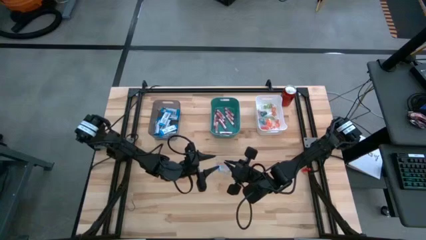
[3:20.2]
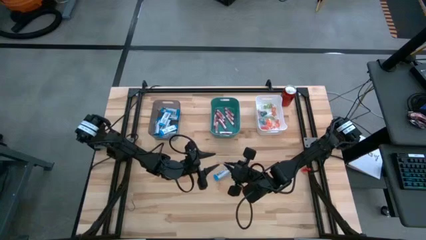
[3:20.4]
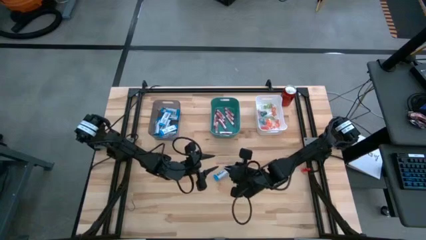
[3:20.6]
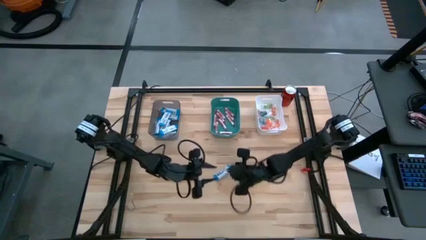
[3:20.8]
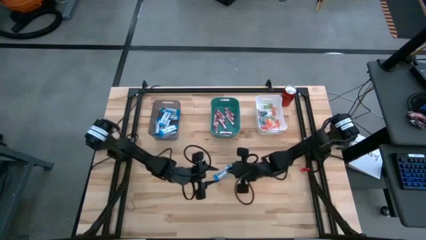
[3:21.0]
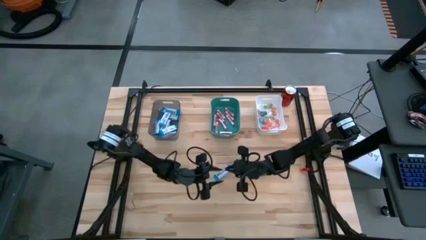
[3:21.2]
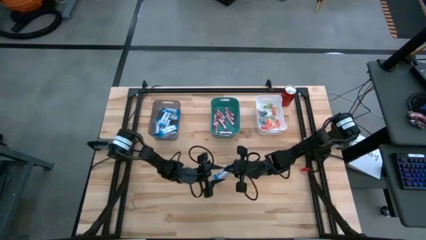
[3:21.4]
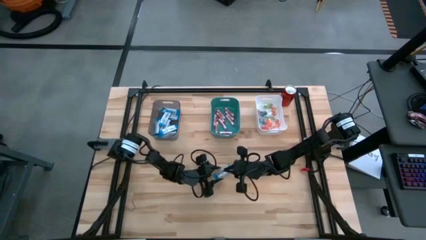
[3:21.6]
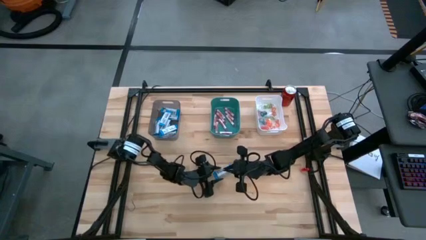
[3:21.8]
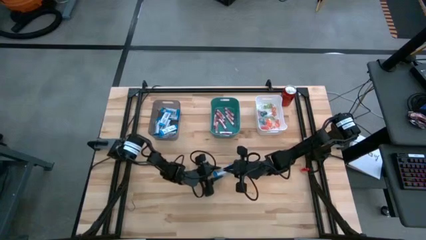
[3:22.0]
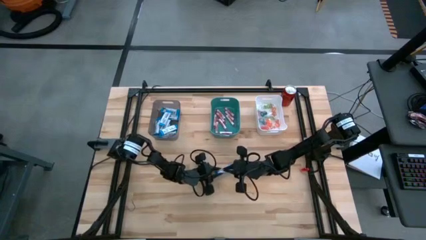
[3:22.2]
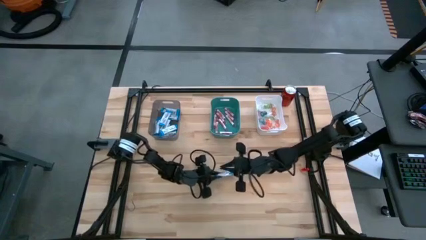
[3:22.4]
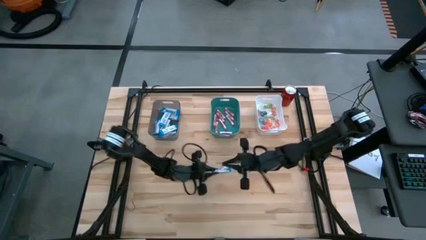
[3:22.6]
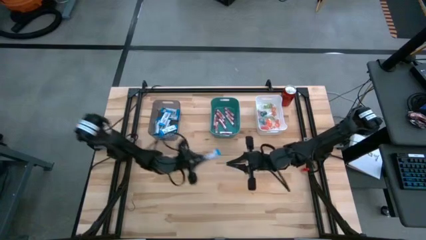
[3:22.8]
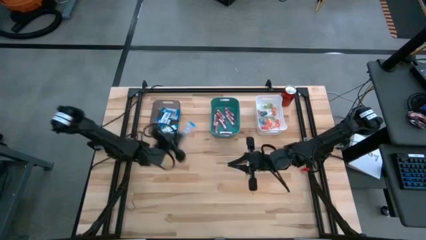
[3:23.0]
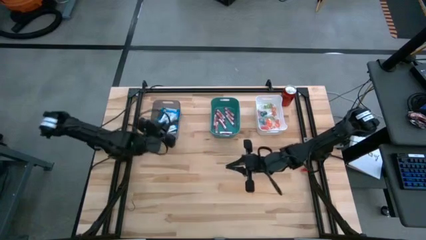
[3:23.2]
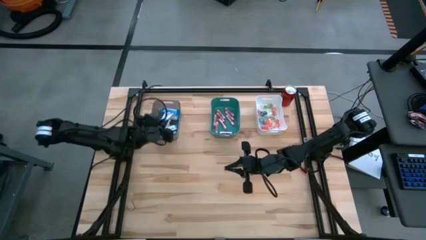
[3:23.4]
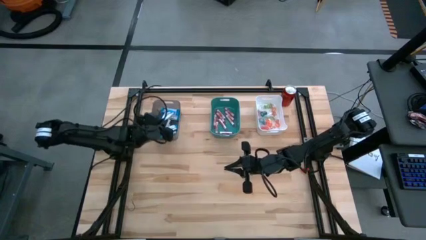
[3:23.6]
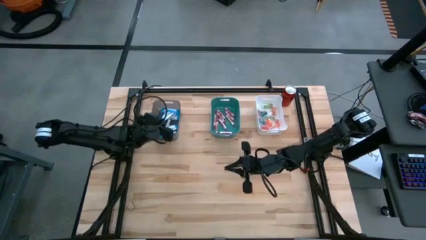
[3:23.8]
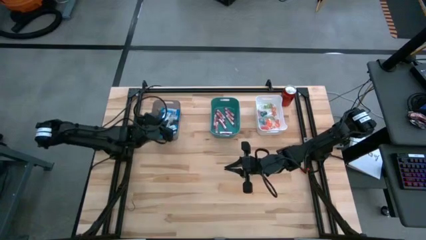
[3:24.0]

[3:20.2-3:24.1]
Task: Sort candy
Put the white chocolate into the black bin

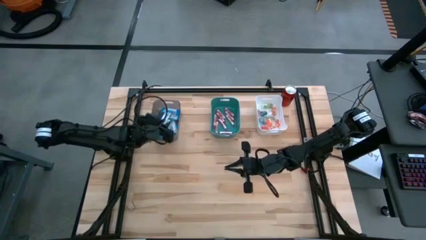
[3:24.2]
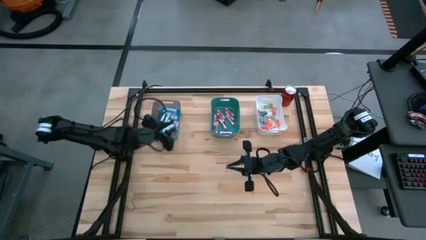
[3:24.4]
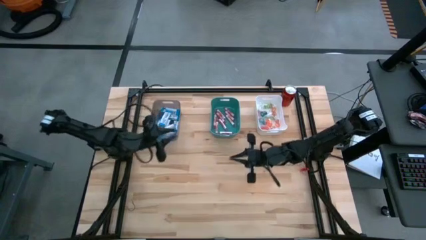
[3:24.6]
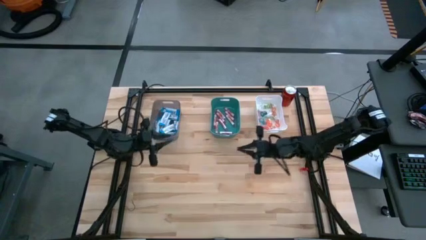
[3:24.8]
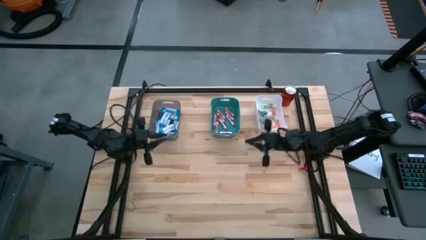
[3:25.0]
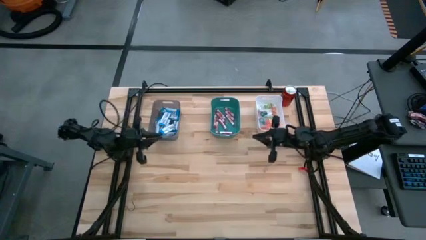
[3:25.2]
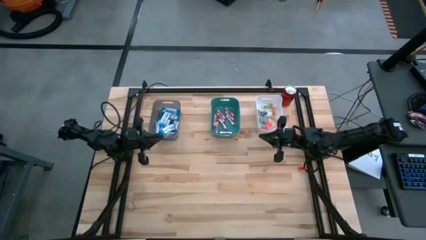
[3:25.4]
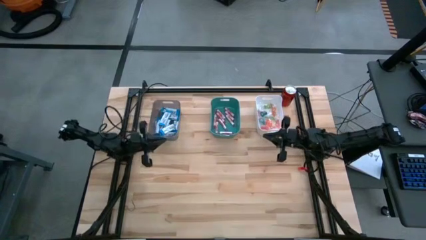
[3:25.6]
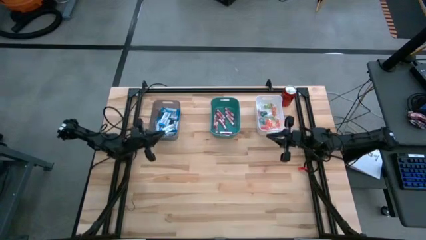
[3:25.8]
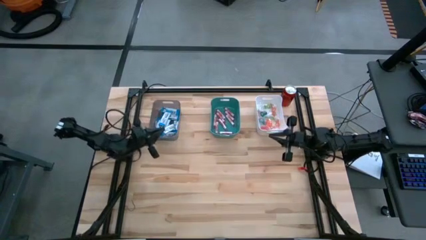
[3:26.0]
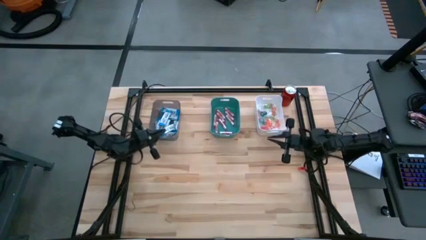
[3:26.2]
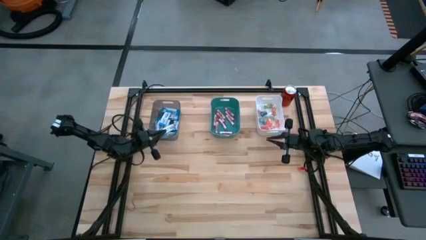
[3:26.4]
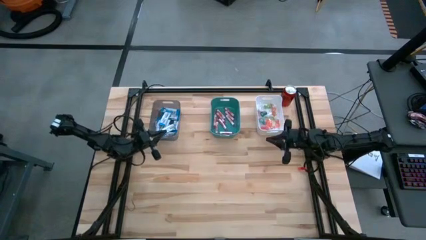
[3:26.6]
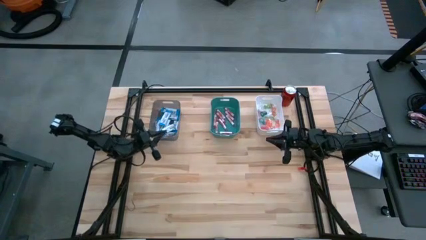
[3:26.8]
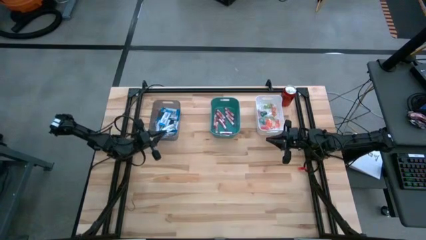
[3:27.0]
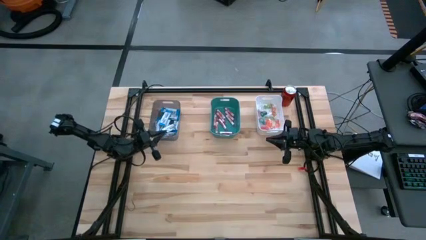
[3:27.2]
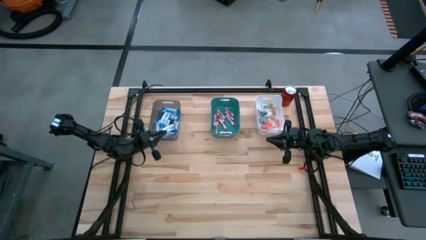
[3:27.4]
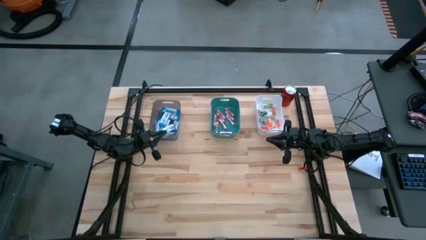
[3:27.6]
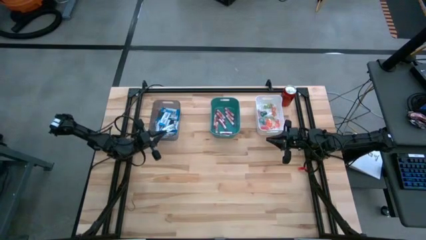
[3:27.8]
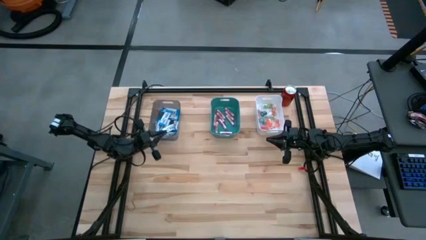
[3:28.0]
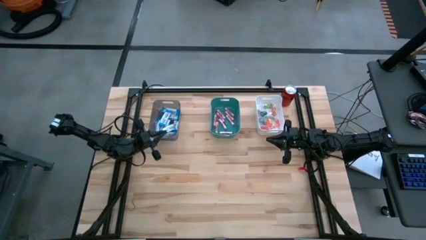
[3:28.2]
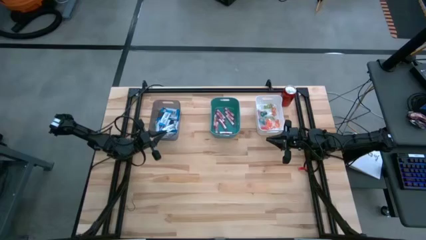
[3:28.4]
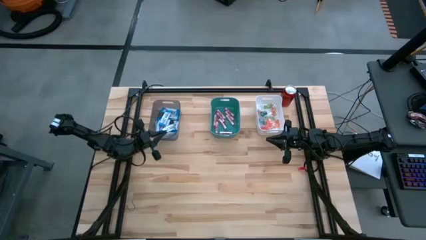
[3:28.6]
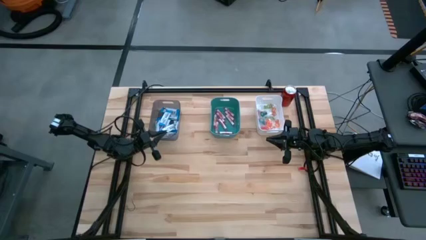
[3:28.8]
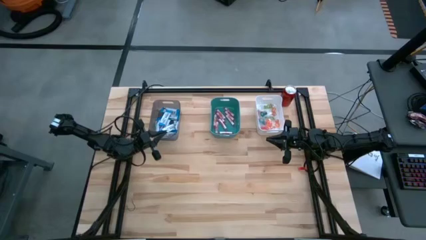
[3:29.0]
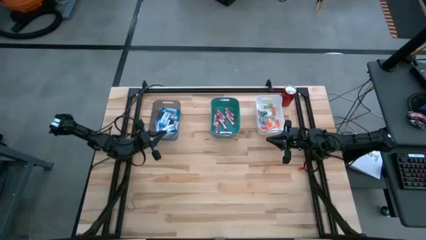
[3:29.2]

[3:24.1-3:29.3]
Return to Home Position

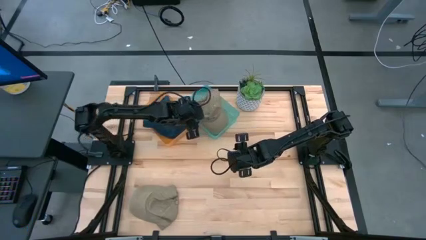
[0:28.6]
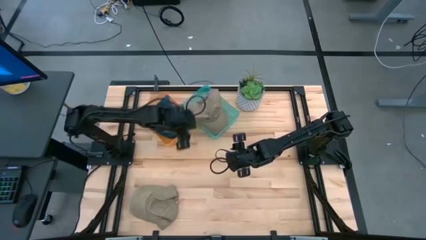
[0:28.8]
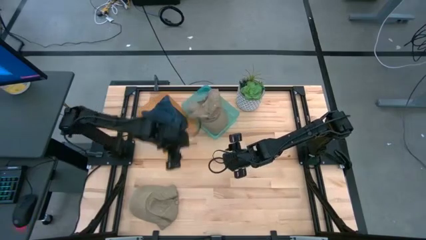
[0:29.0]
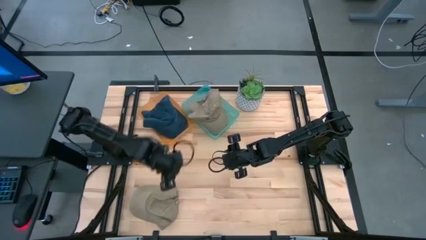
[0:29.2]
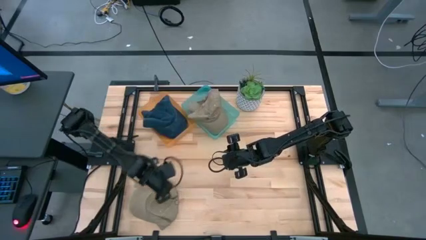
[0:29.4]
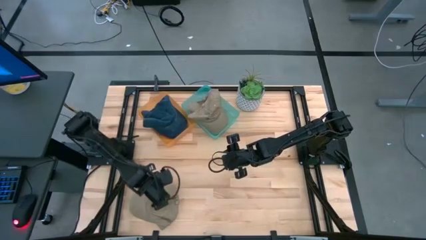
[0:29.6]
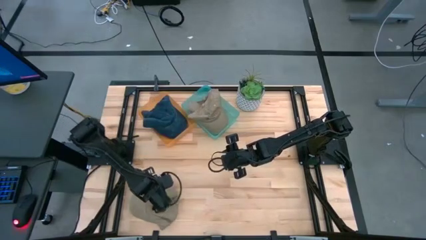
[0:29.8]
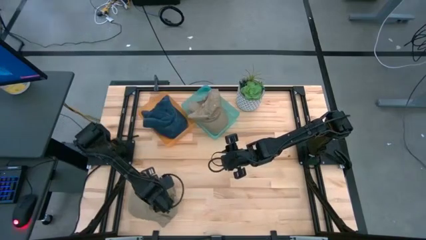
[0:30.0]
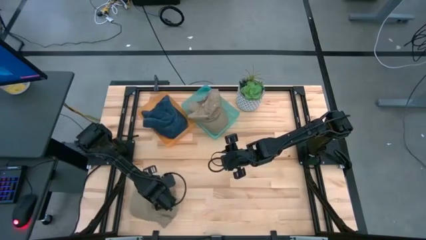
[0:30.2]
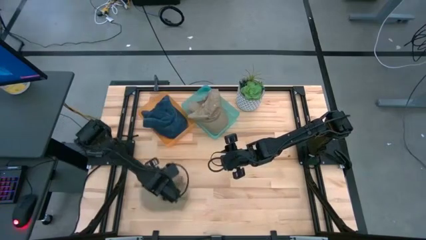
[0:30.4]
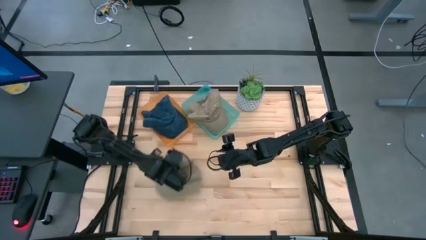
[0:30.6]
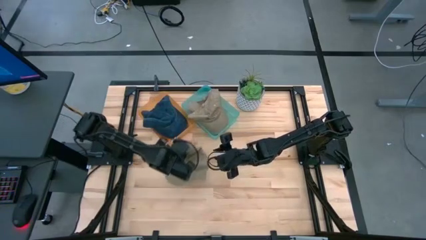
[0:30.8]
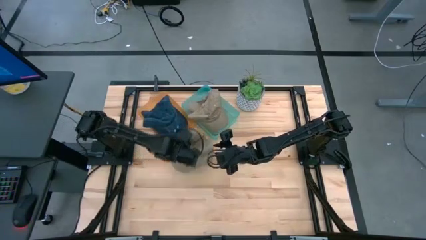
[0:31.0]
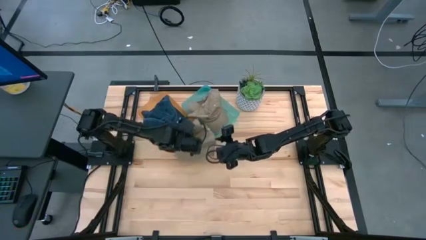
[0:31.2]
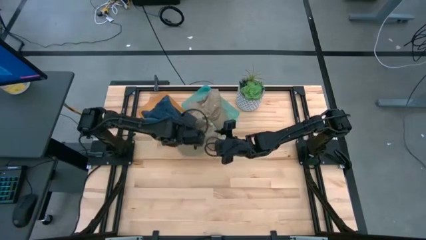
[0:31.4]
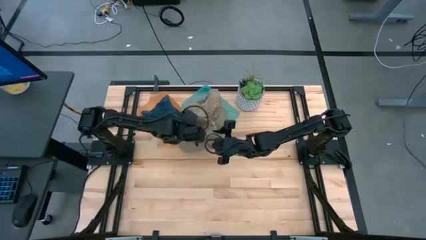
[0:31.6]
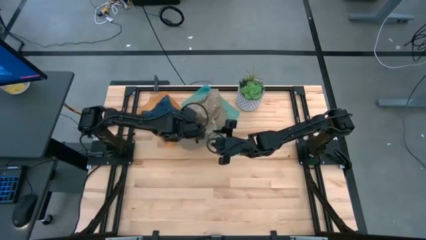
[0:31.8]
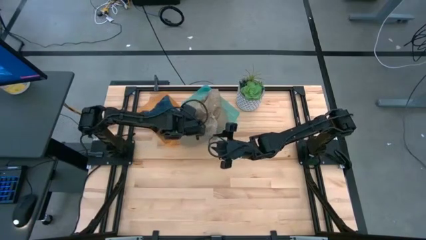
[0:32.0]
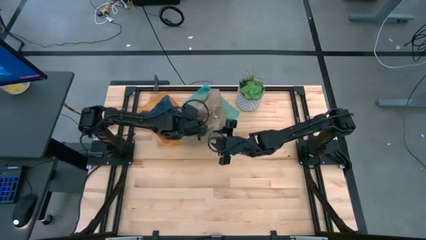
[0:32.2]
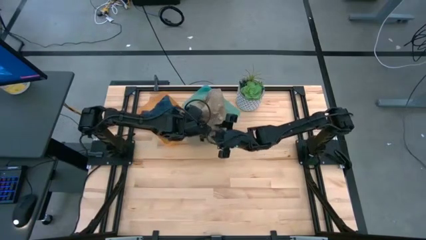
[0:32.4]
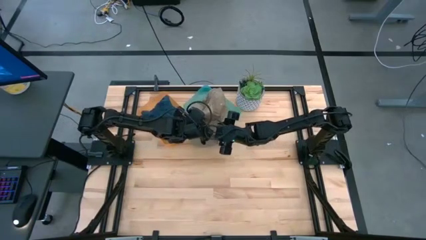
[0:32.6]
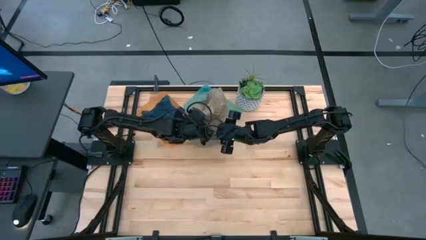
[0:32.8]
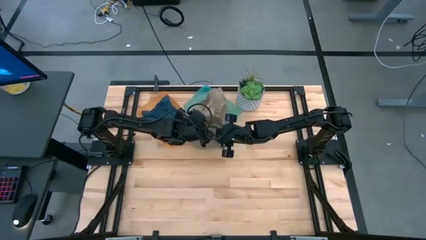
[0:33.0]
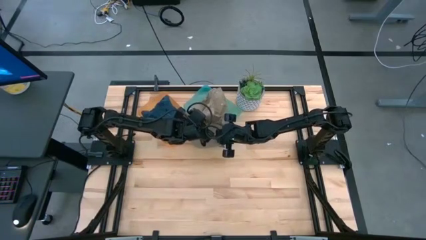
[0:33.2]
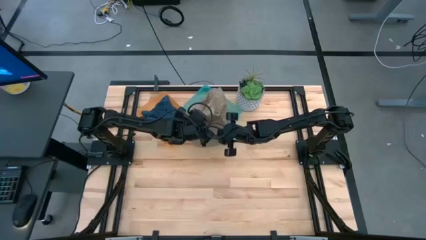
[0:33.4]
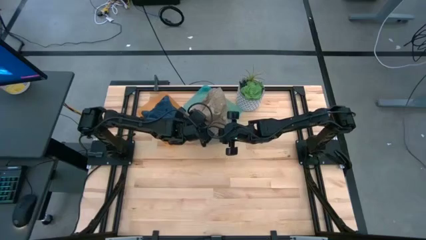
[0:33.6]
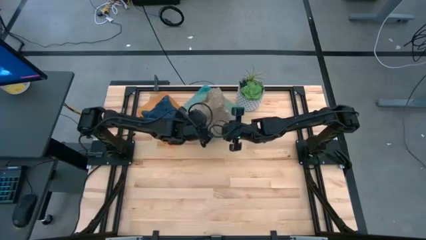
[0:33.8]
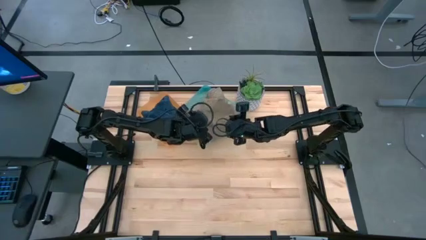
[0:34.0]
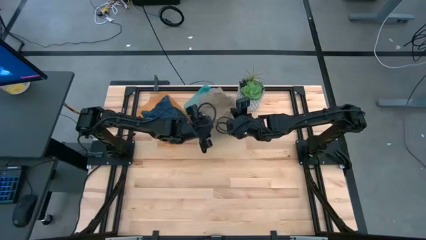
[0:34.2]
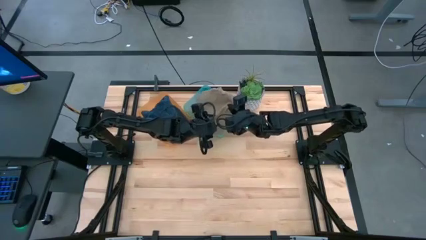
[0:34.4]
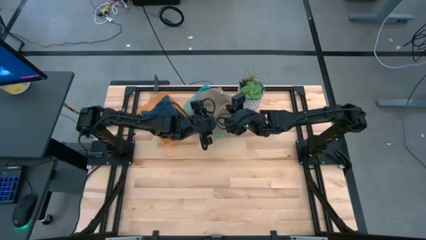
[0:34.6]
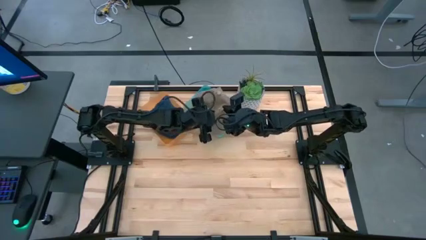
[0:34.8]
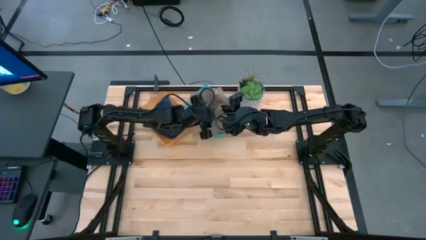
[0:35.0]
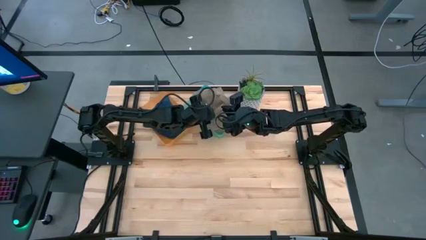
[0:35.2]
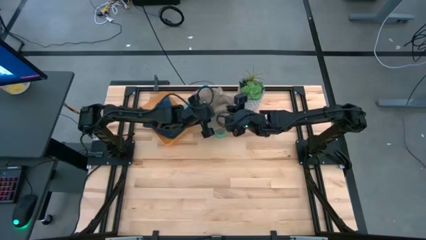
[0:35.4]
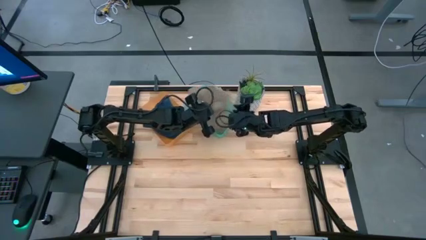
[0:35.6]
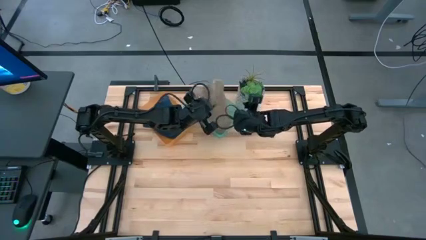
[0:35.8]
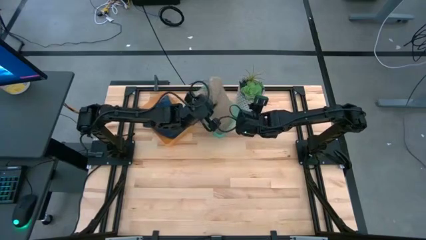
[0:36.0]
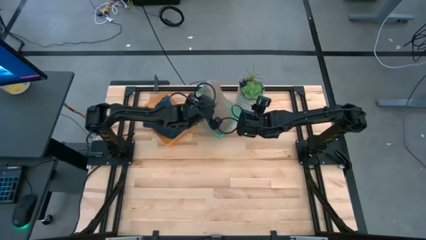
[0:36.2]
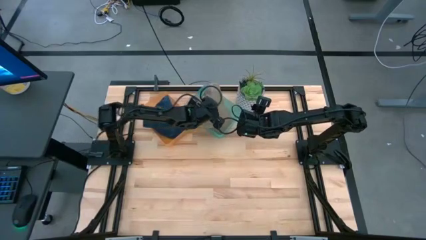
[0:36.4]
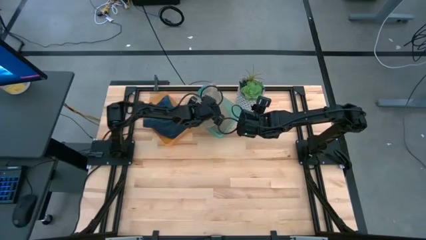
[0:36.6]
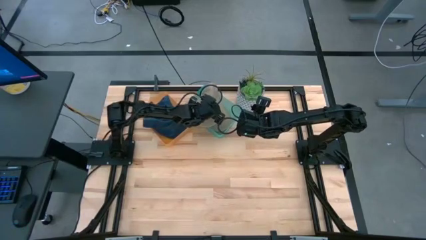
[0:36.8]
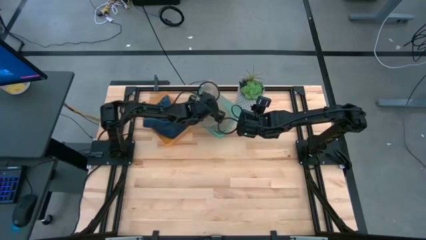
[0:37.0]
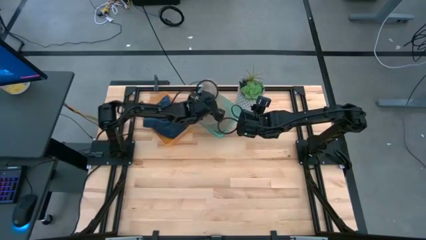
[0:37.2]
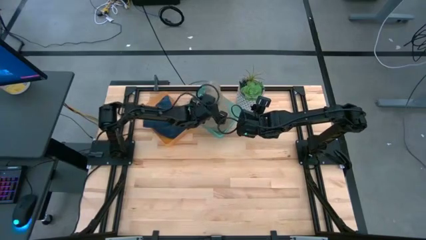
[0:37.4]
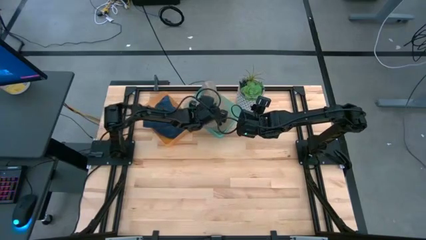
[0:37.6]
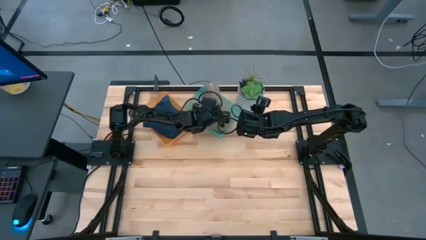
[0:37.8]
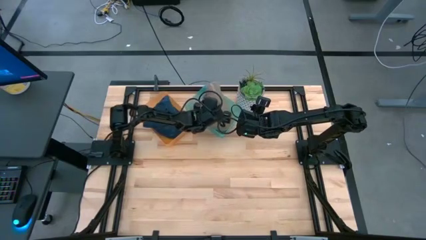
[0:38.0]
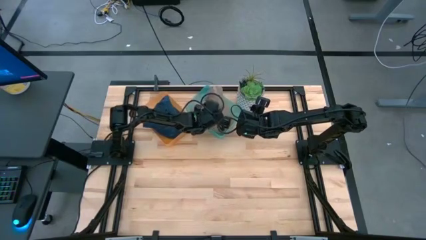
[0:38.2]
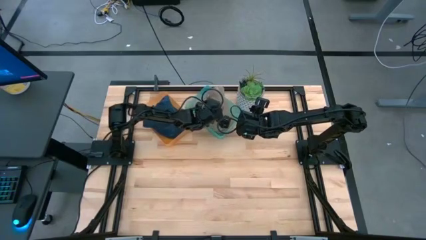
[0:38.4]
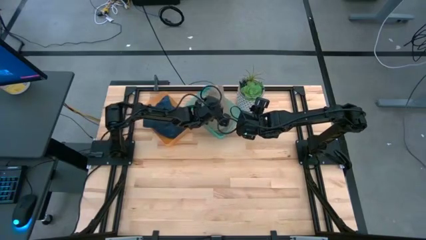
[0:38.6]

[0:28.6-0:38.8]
Task: Pick & Place hat
Put the brown cap into the blue bin
